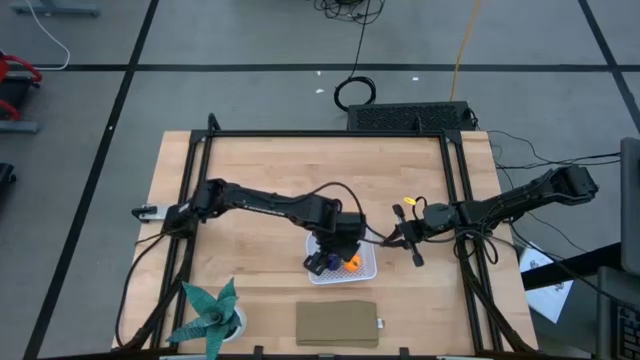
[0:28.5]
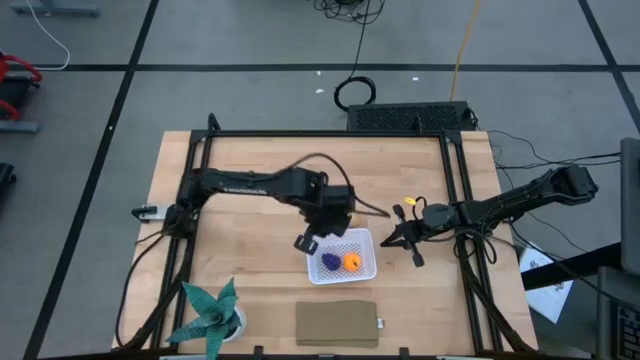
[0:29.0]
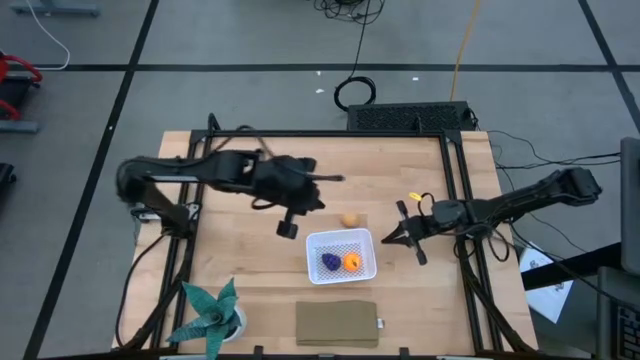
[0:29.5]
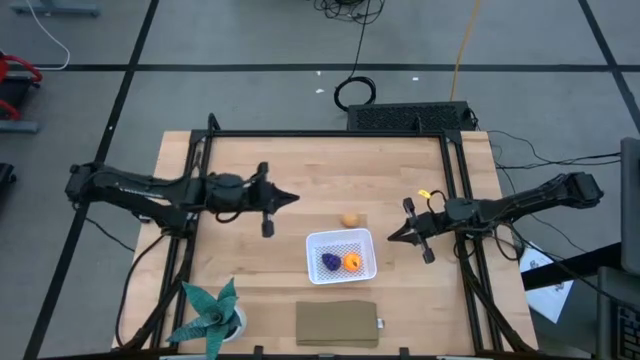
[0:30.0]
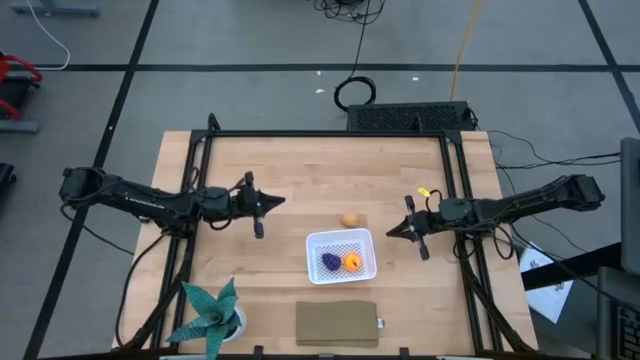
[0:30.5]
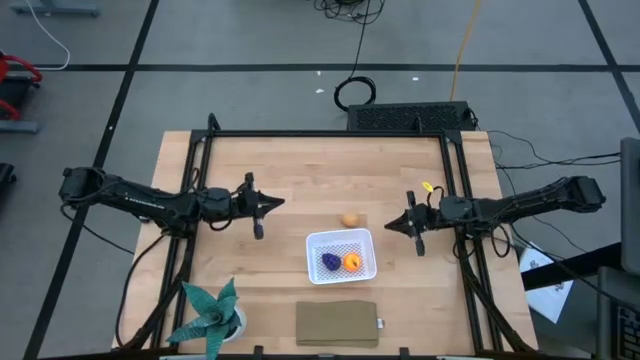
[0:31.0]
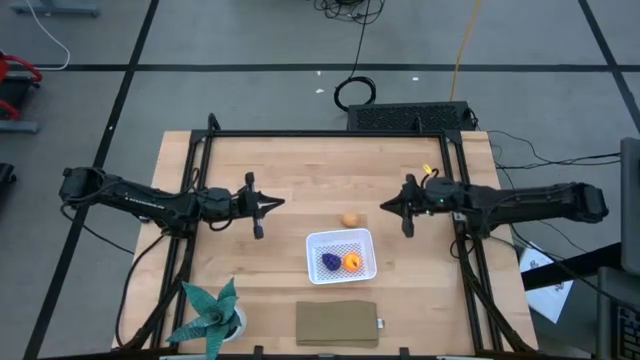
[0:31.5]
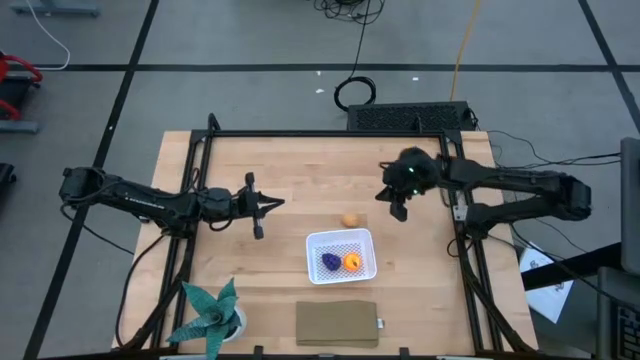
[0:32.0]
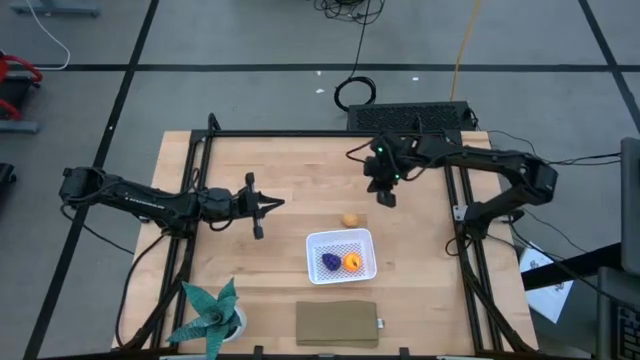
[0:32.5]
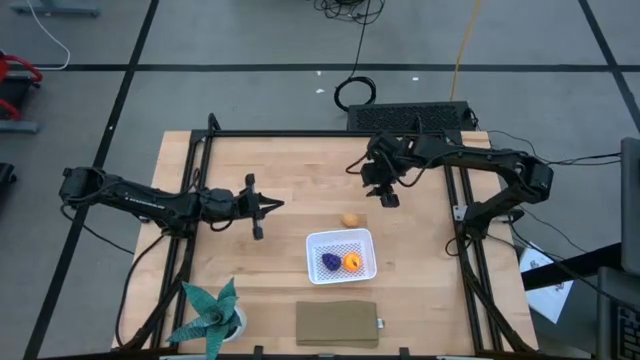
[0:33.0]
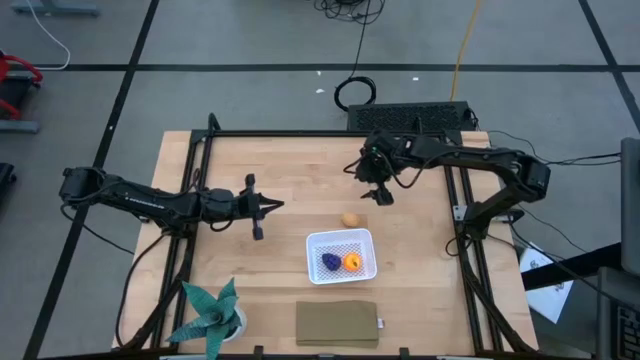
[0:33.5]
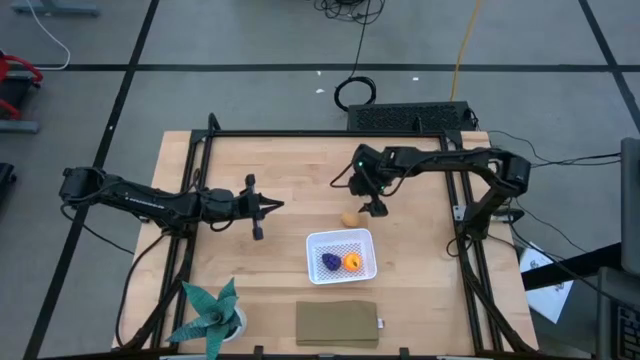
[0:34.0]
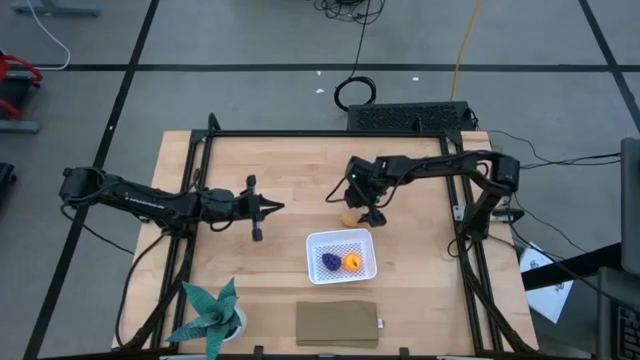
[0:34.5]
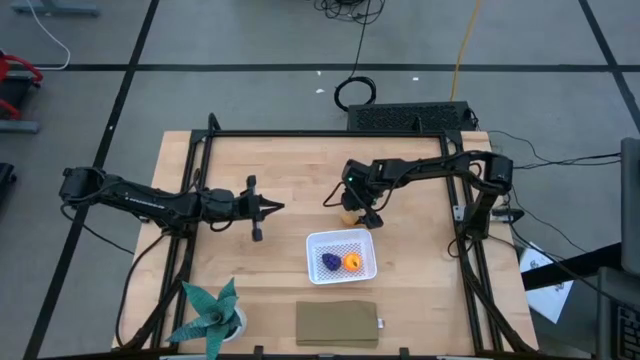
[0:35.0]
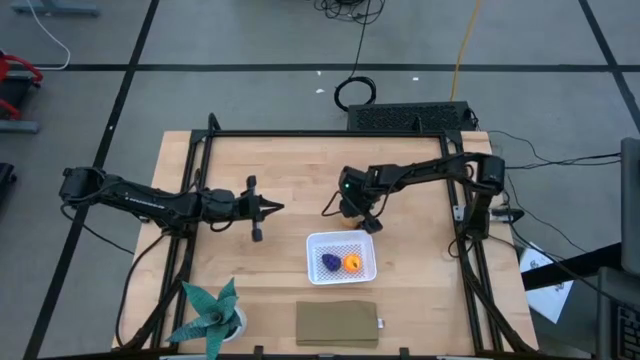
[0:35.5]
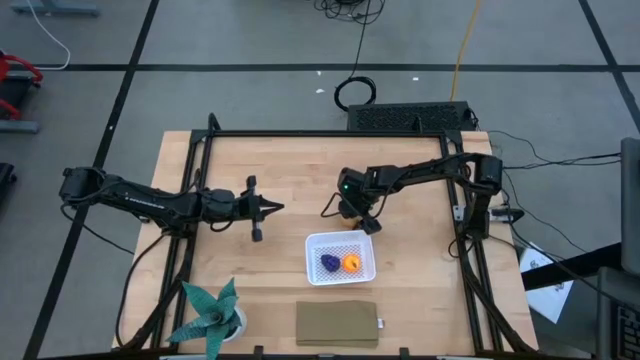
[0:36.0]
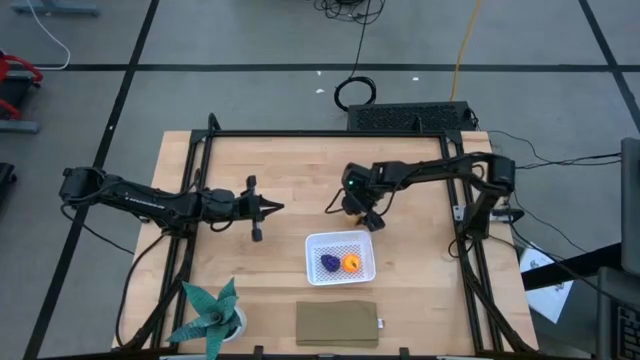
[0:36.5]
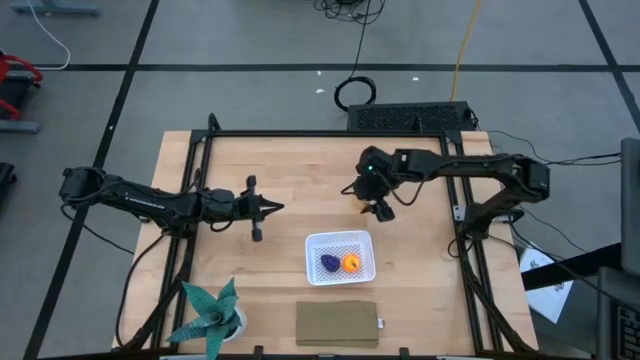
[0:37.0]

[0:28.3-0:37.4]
Task: Pick and placing Produce into tupperware
Put the potato into the white basket

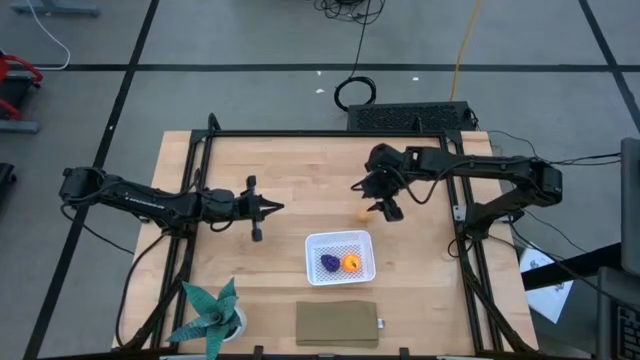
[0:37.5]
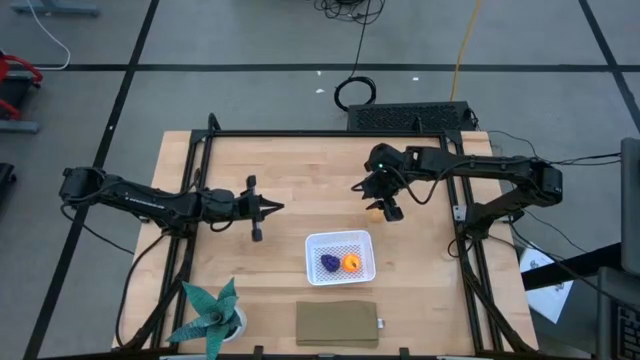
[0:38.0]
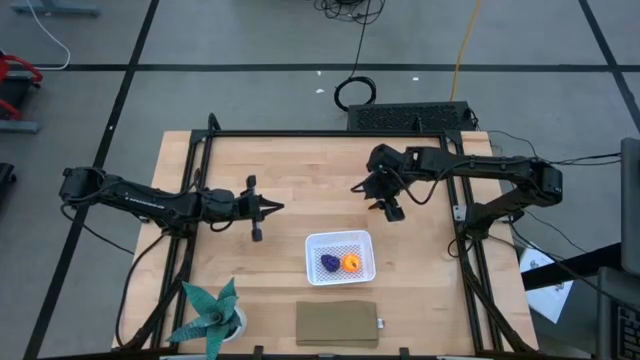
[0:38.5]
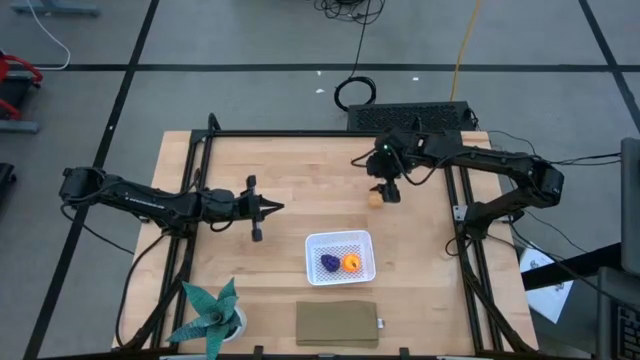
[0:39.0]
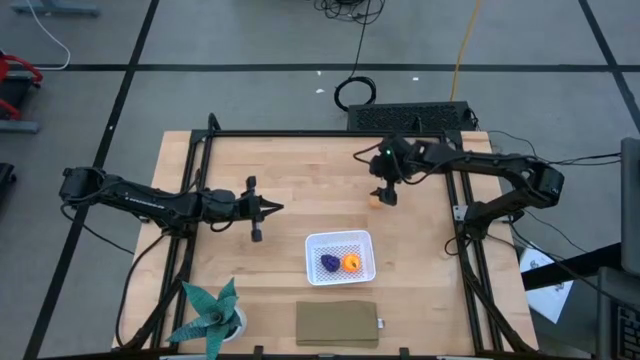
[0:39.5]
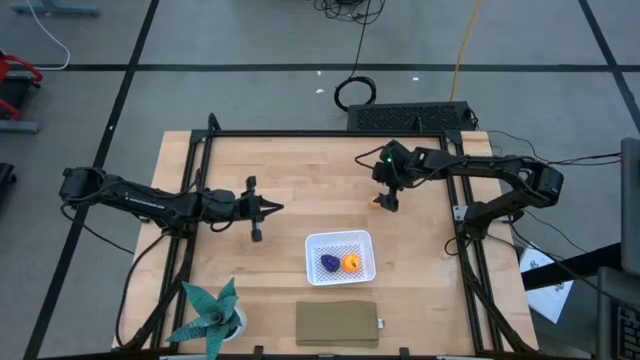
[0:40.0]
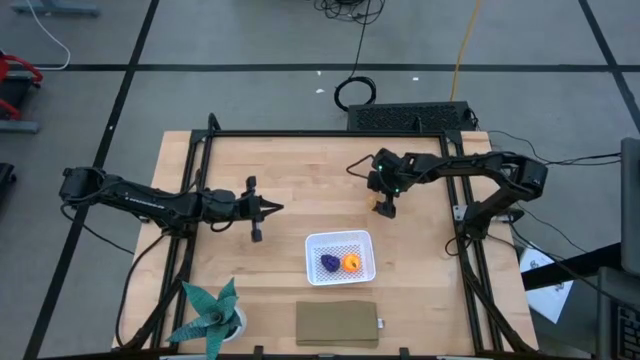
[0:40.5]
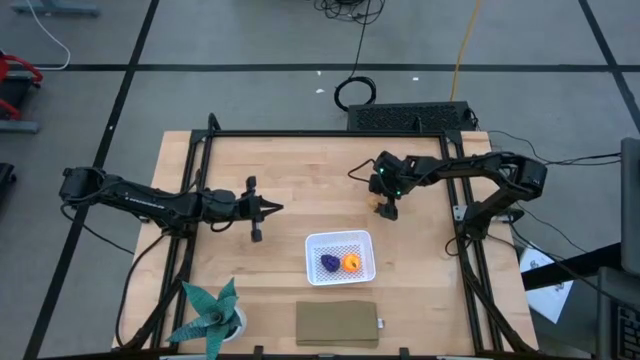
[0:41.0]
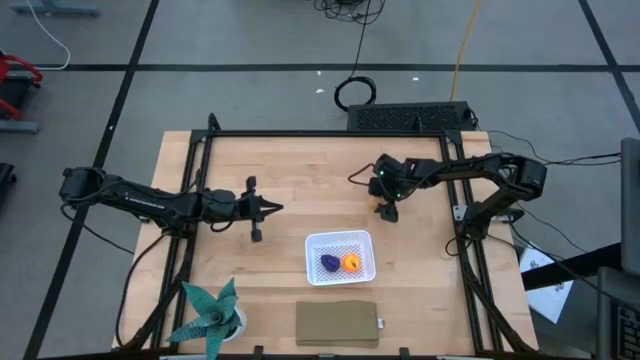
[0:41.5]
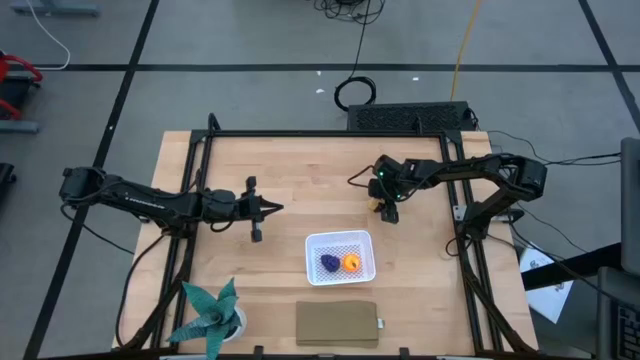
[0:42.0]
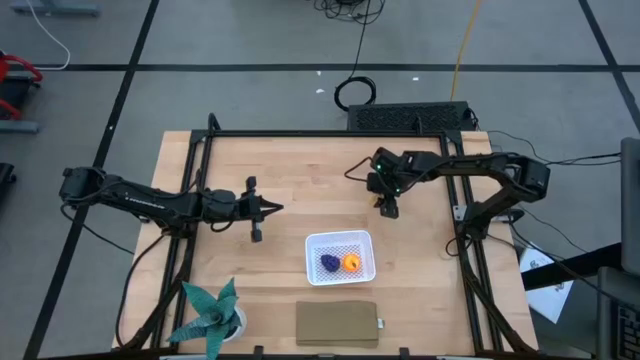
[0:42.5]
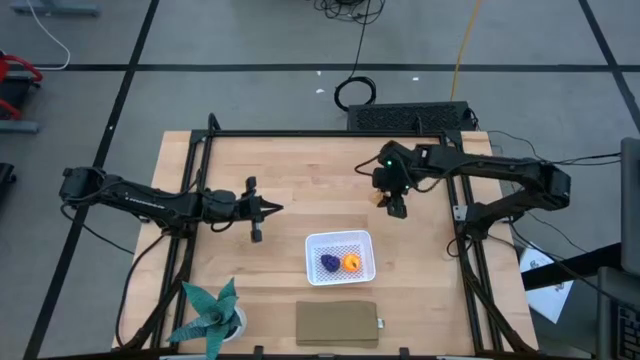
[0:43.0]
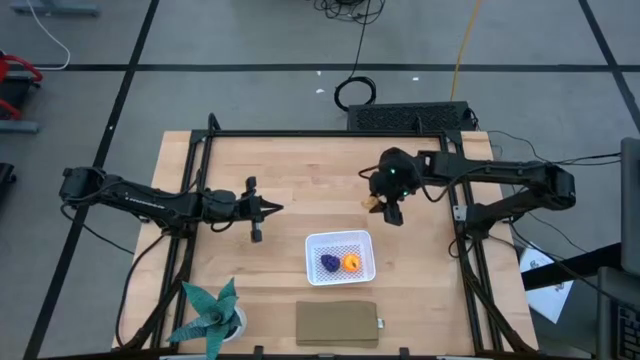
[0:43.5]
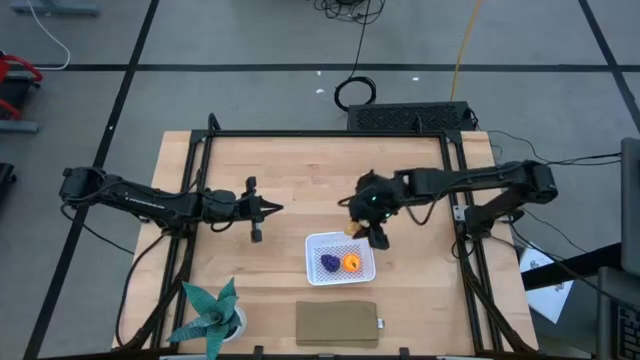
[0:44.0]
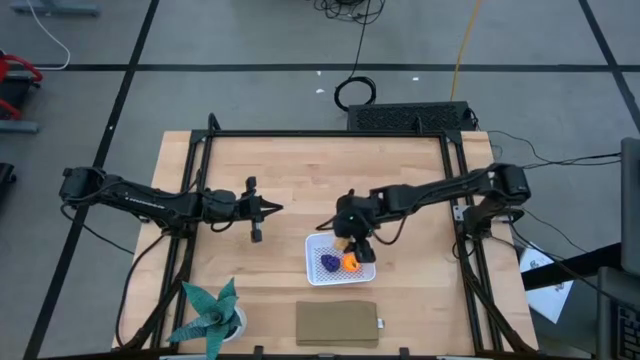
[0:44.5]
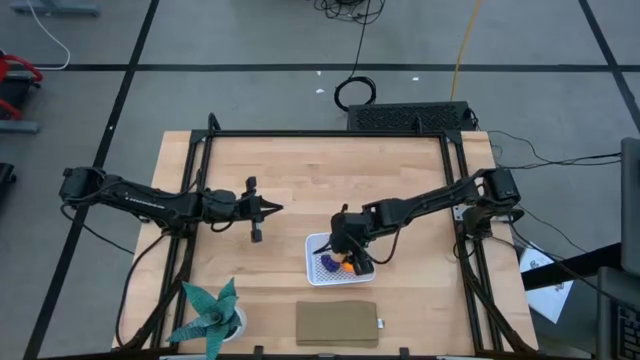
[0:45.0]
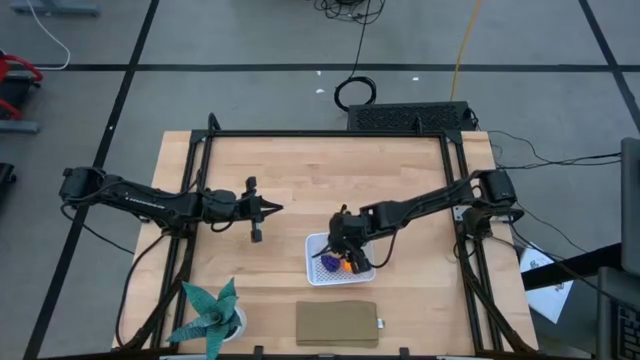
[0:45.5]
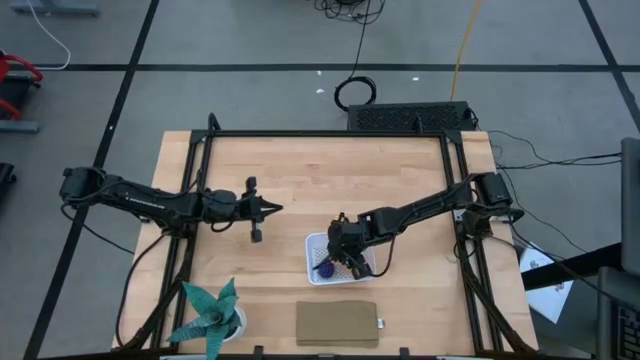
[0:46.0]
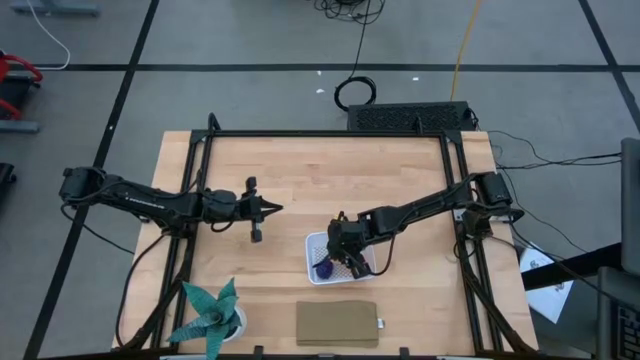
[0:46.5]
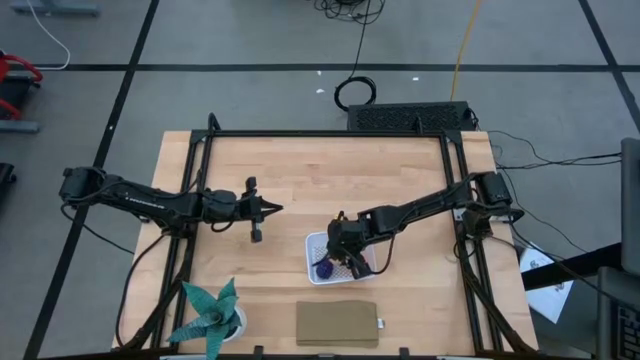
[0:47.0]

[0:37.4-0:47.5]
Put the potato into the white basket

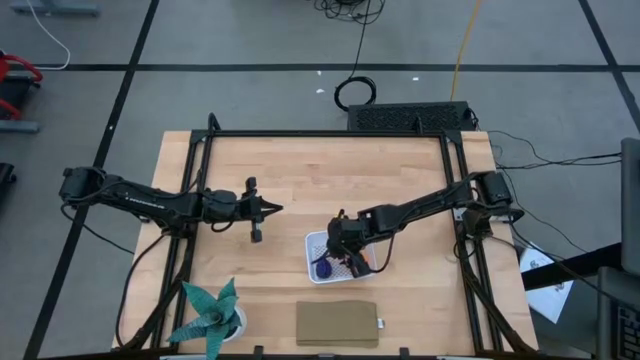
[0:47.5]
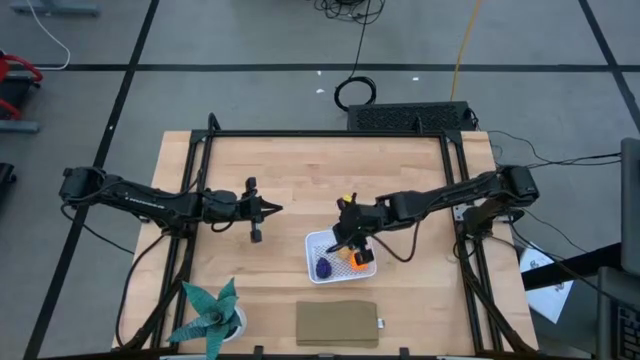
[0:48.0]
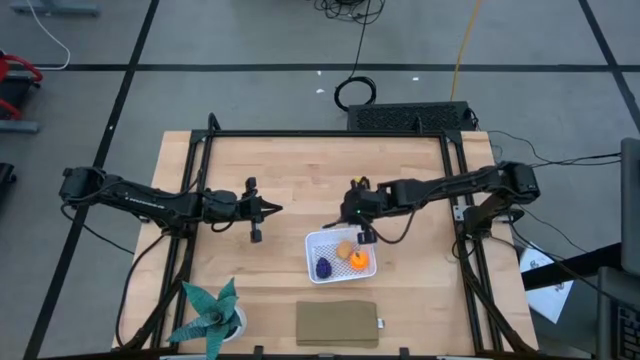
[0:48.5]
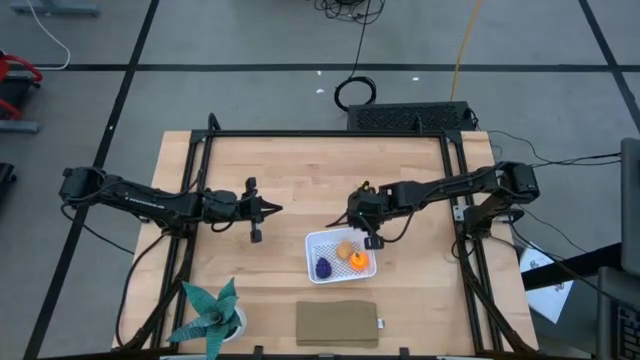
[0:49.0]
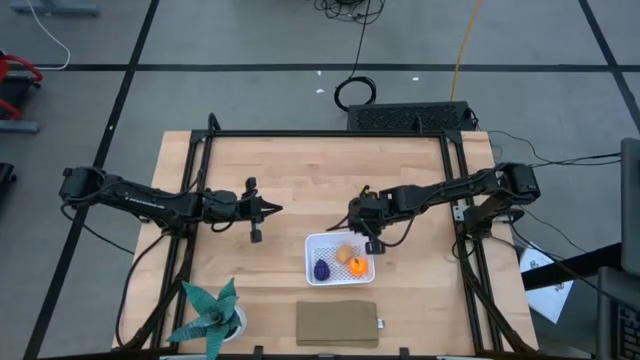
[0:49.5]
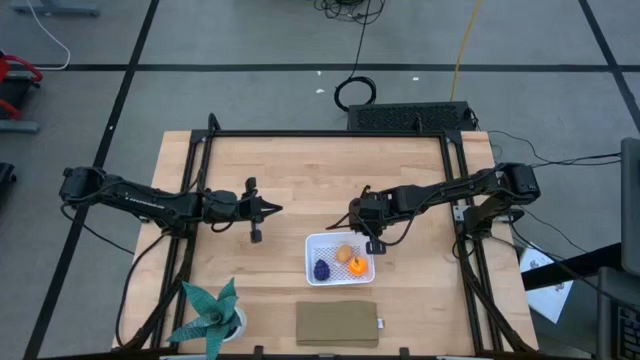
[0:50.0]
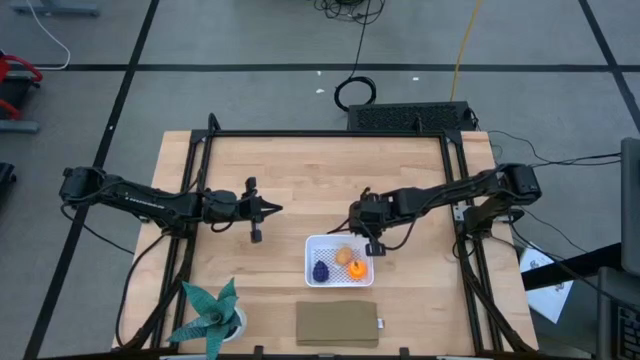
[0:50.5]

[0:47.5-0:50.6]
Adjust the white basket
